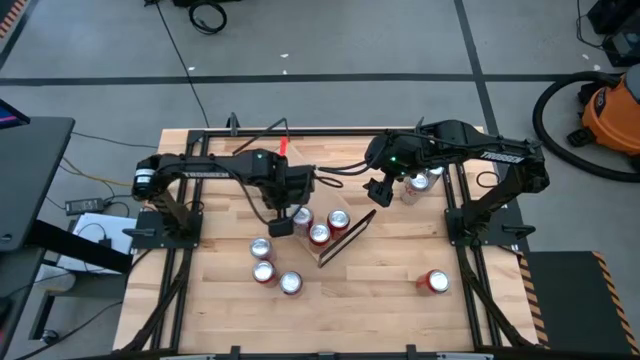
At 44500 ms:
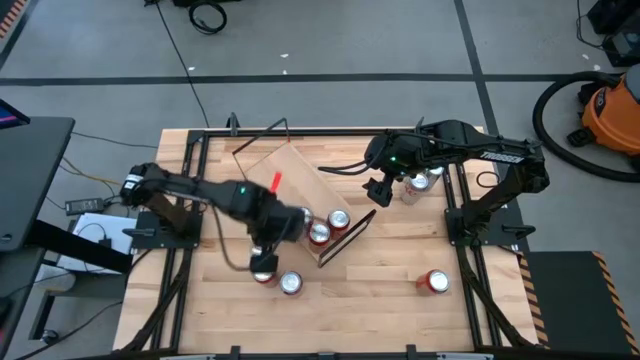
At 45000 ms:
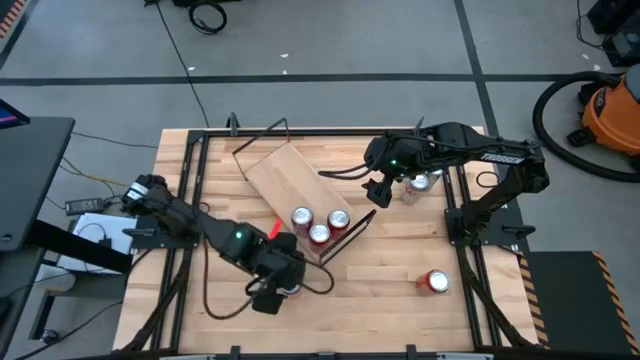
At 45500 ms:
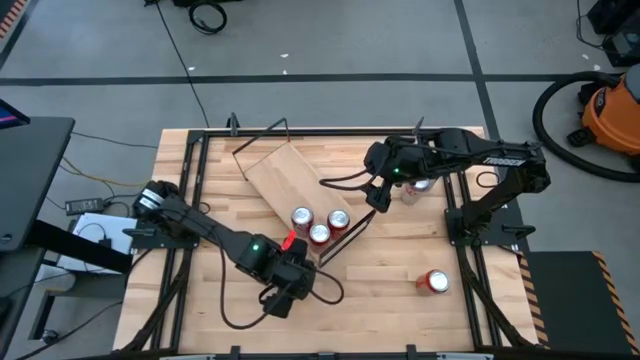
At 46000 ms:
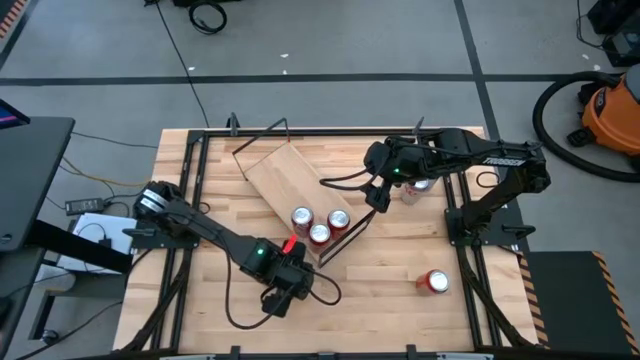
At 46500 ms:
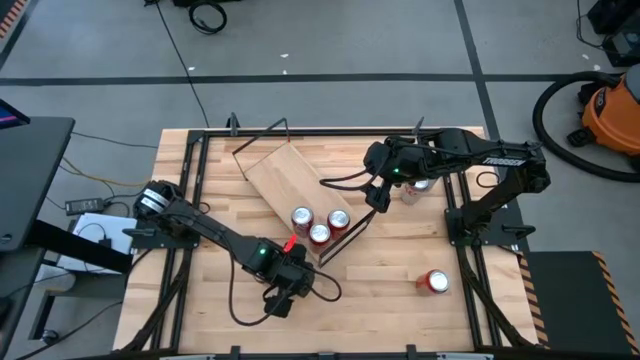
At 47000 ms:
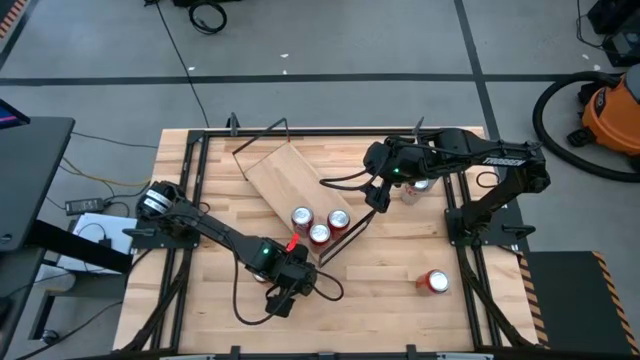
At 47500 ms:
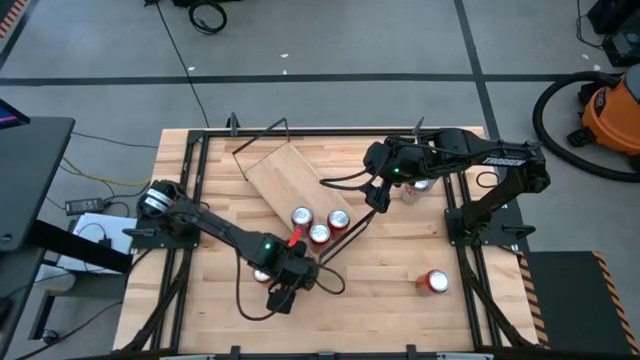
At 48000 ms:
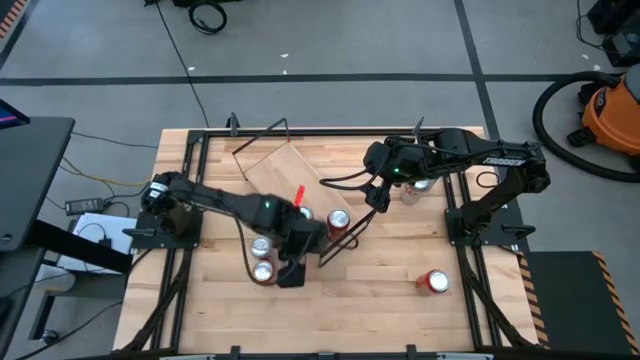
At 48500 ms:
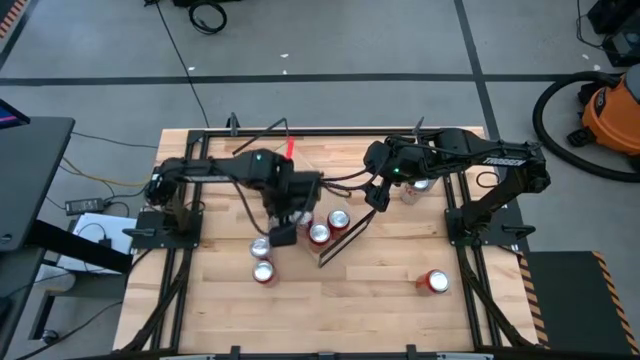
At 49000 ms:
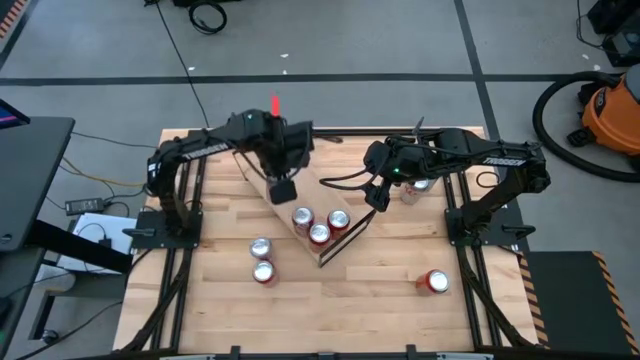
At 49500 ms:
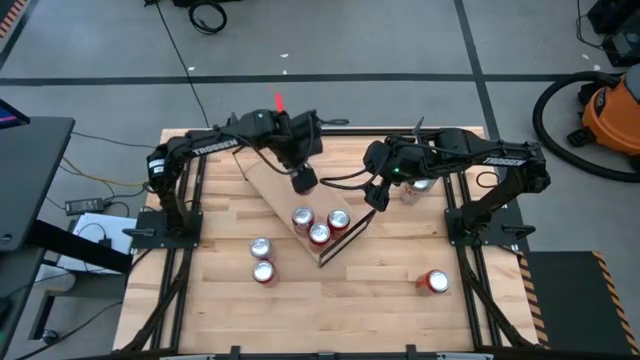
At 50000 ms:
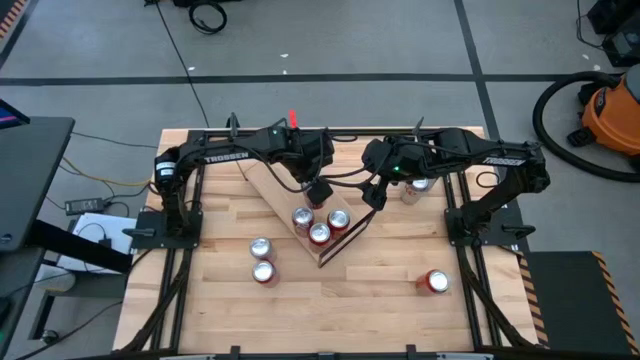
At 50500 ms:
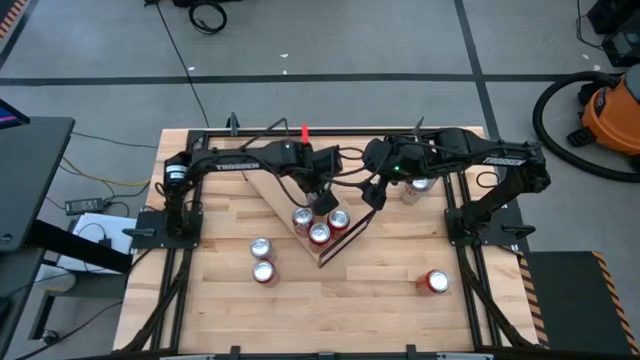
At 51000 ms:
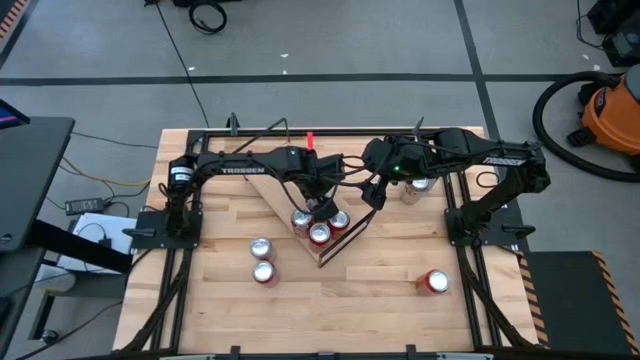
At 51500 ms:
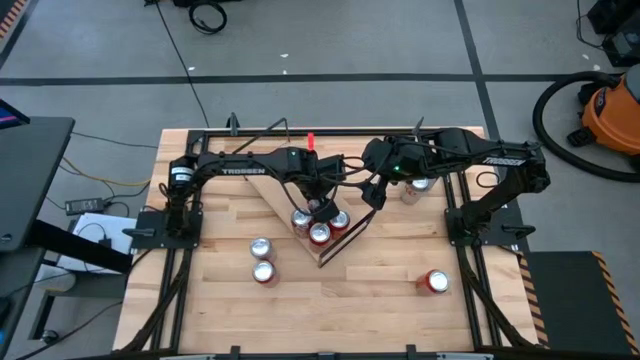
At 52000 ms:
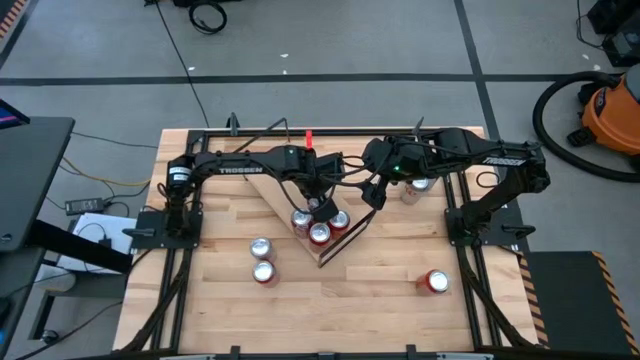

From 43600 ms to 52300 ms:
Task: Place canned beverage on shelf
Put the red and white soda can on the shelf aligned with the other red and white soda can

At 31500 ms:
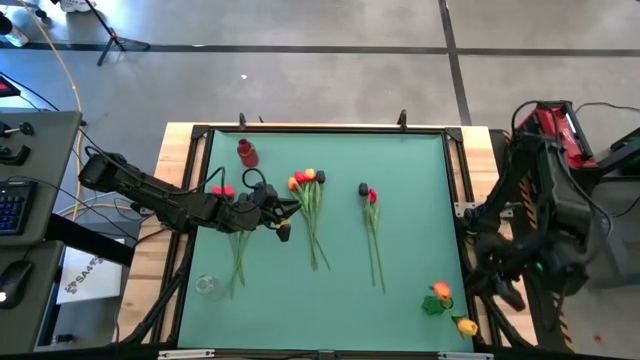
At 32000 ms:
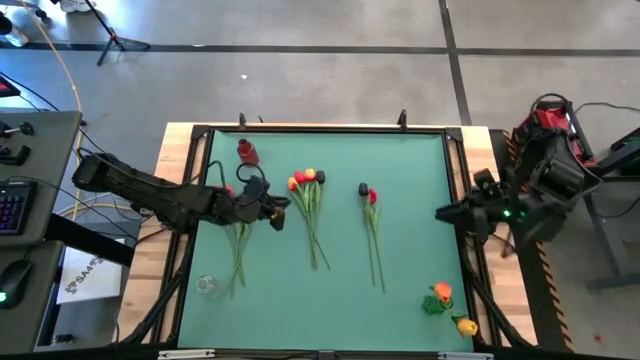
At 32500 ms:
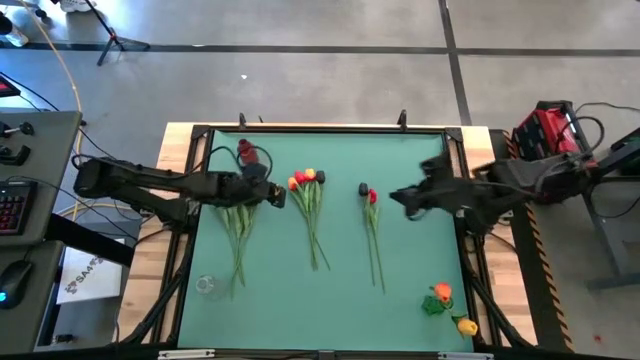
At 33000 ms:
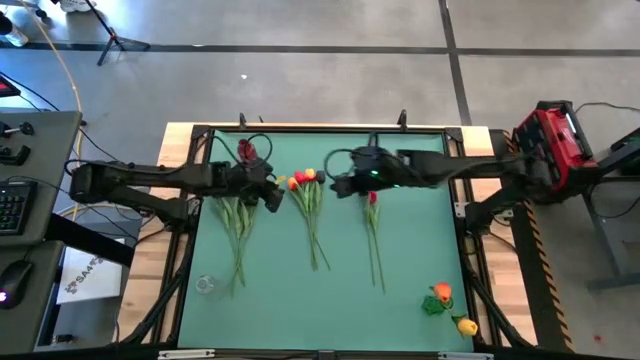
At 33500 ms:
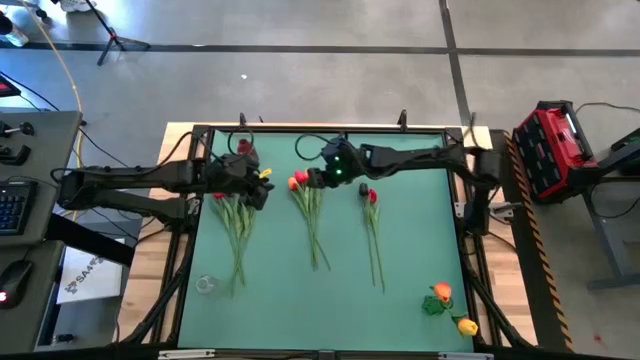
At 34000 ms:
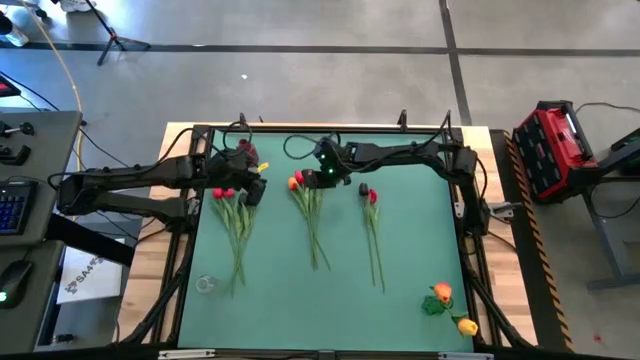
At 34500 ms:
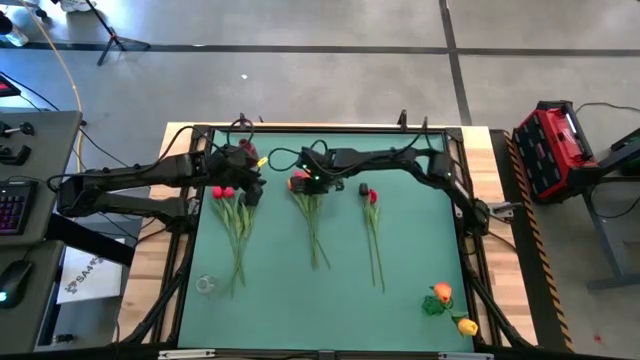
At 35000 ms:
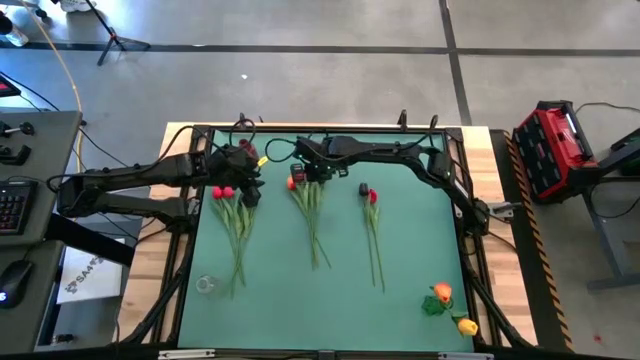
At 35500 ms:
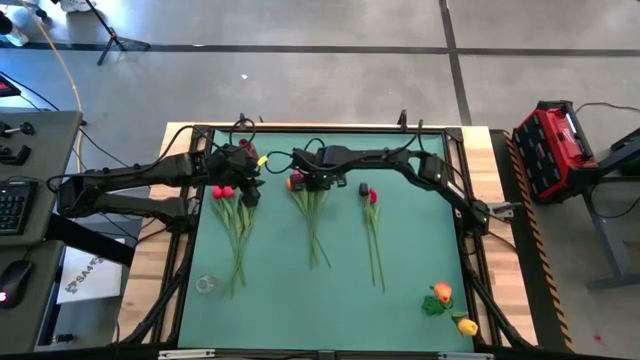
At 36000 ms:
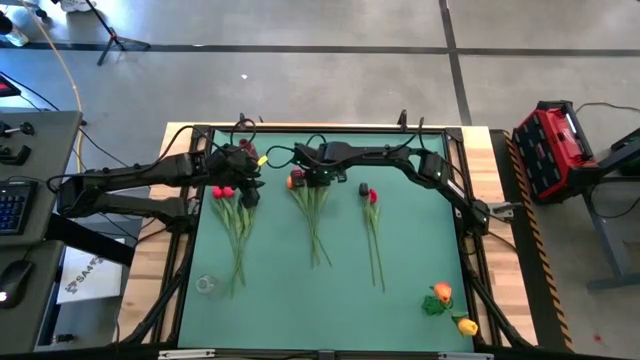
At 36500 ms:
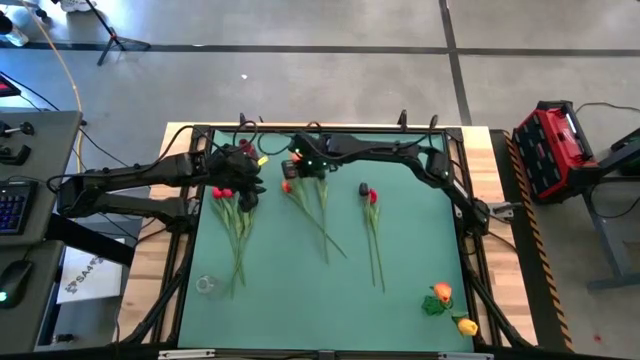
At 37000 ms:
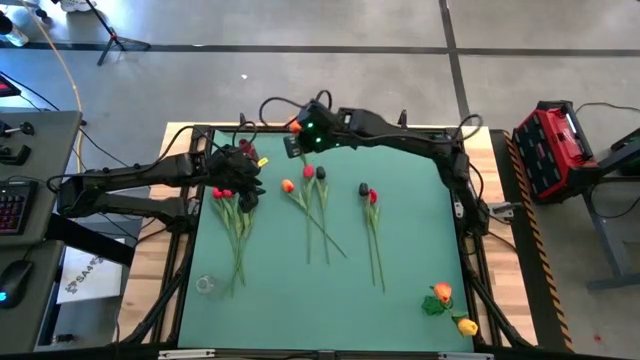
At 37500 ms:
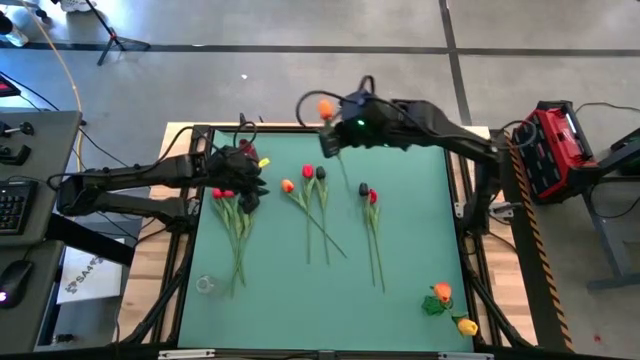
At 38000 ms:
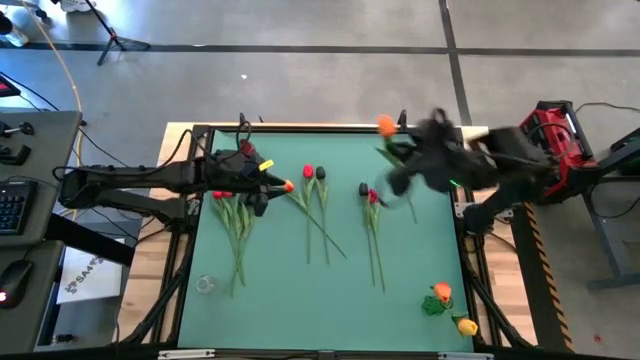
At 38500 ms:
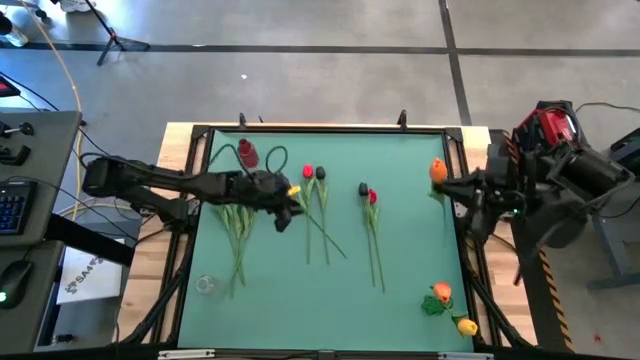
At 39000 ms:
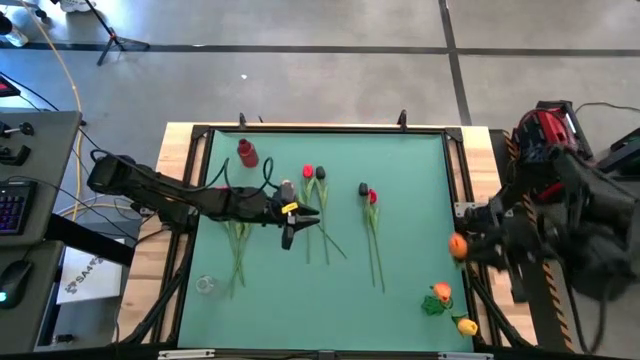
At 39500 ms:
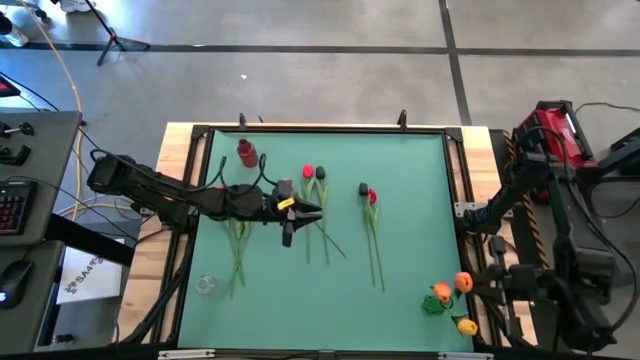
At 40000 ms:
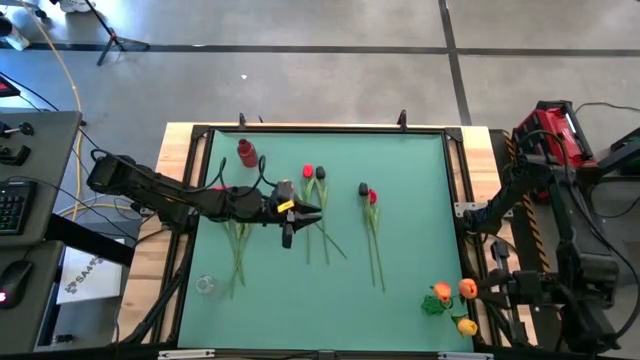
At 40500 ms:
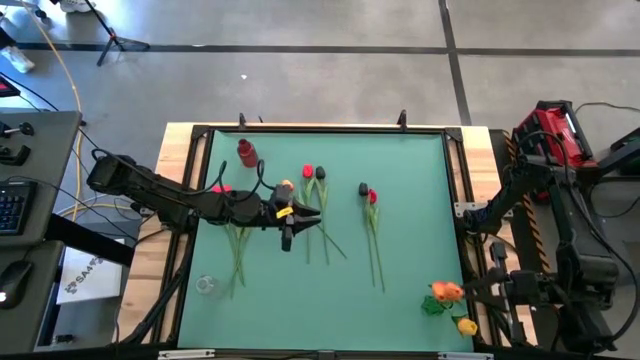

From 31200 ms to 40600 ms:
Task: Sort flowers into vase by color
Put the orange flower into the green vase
